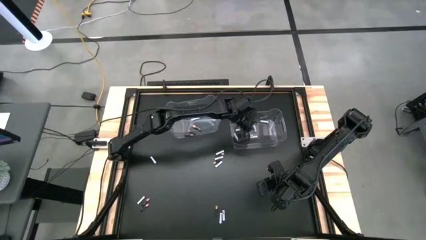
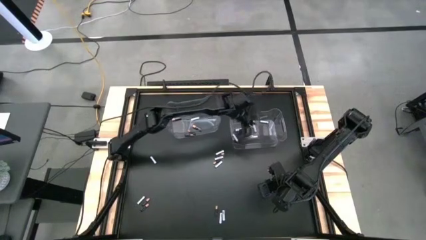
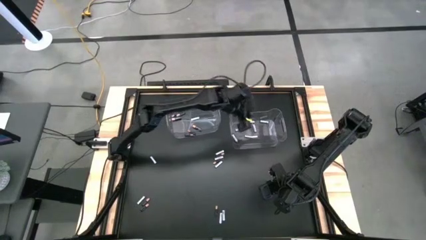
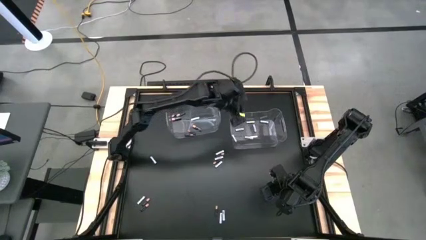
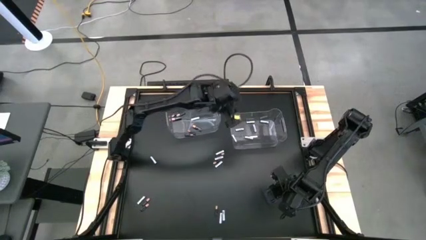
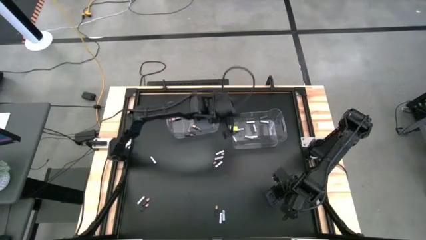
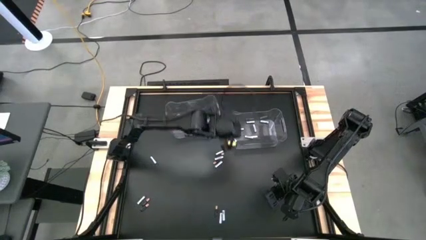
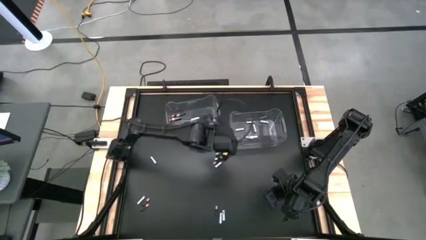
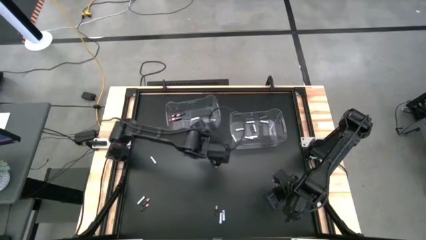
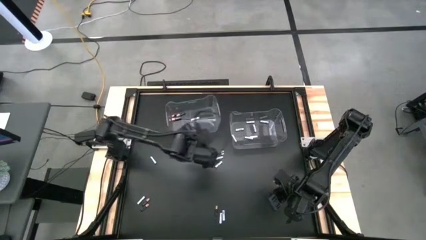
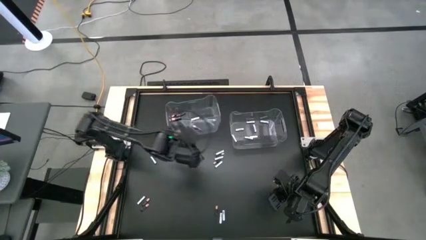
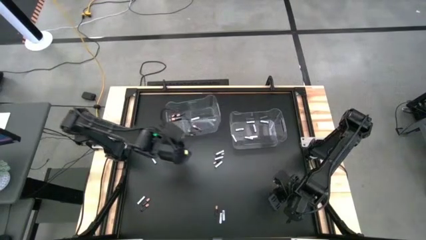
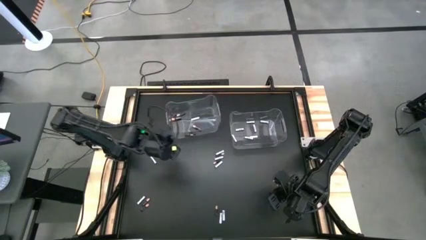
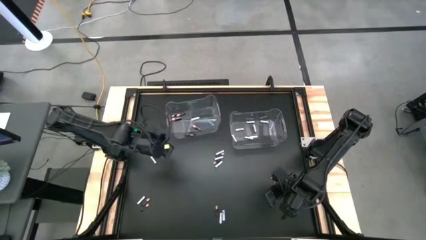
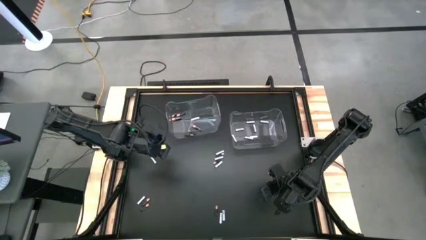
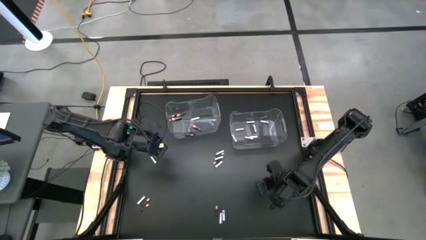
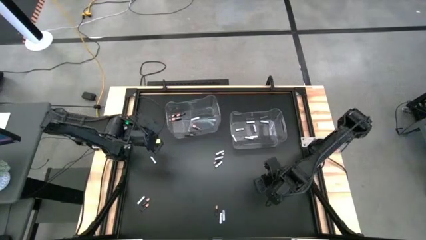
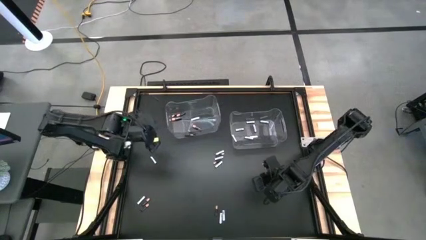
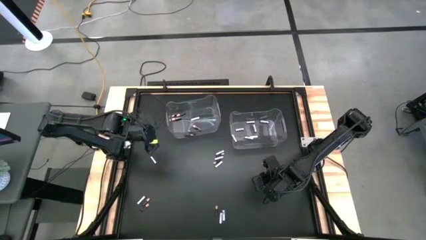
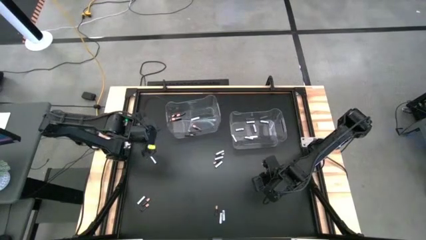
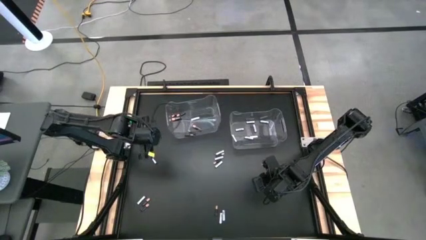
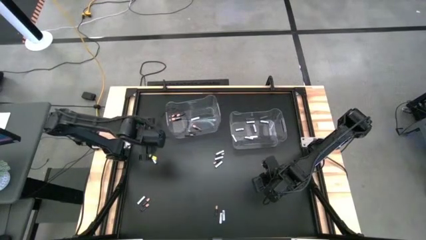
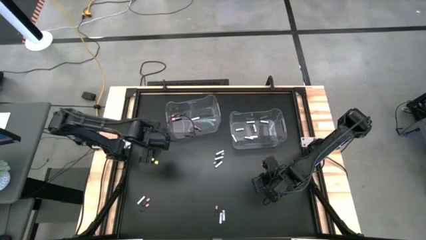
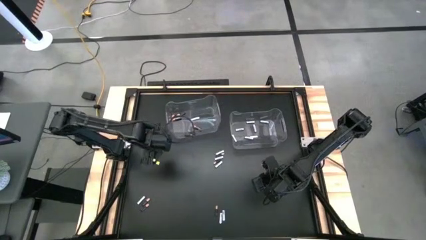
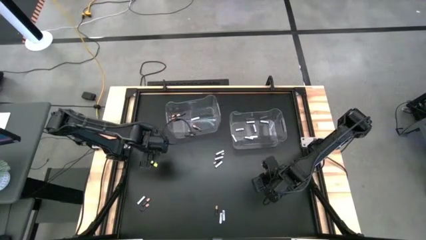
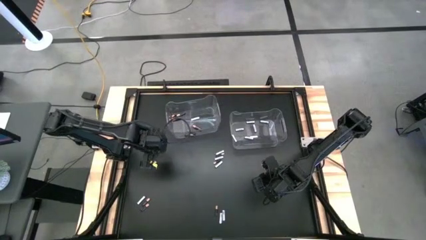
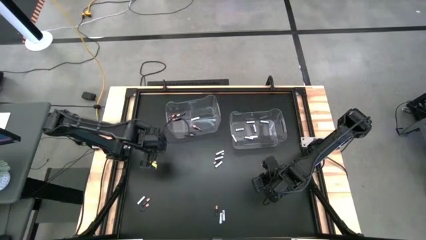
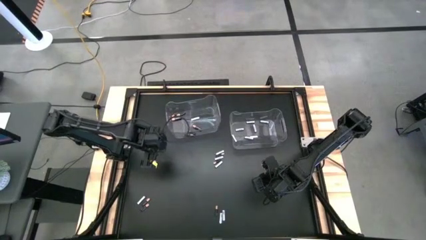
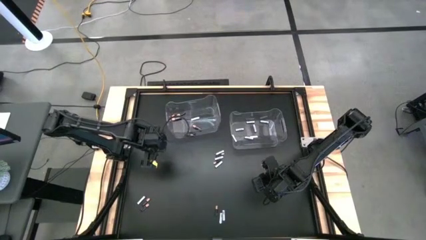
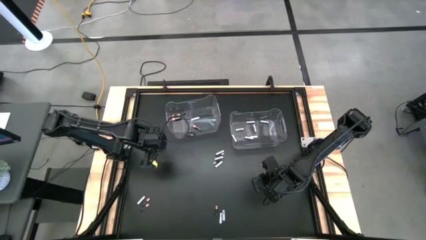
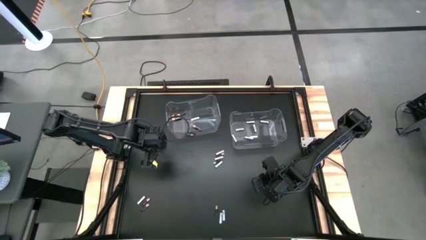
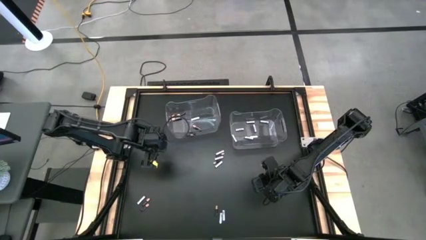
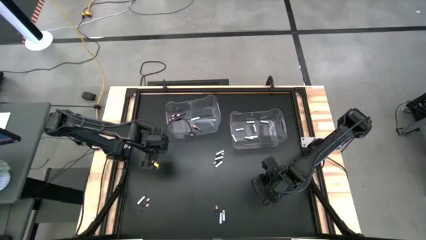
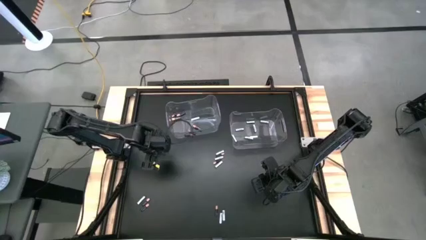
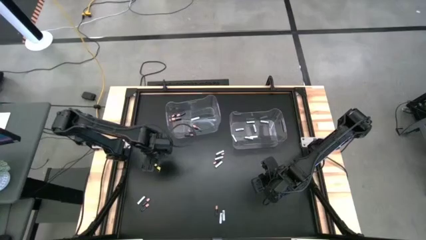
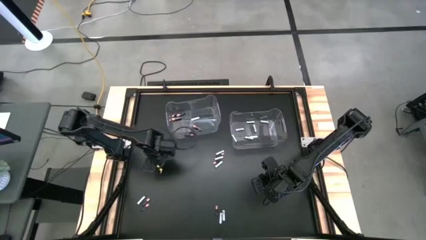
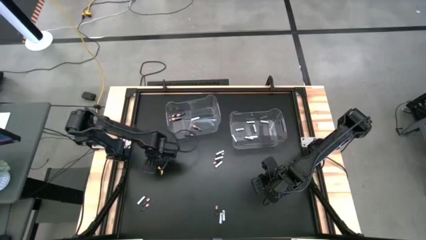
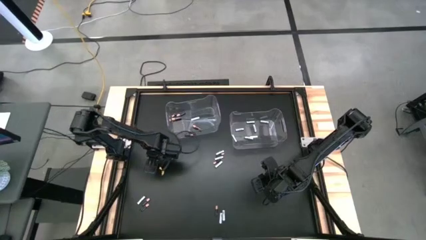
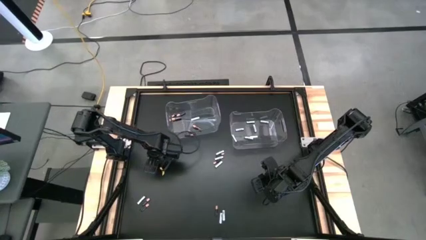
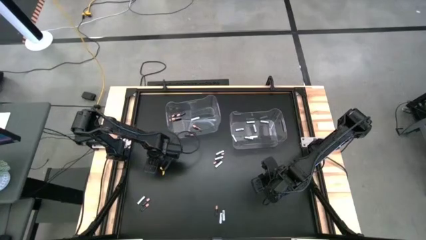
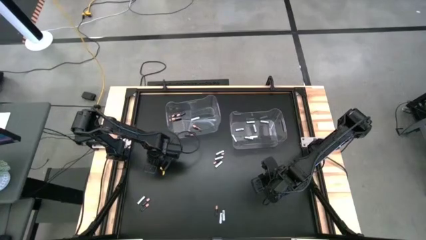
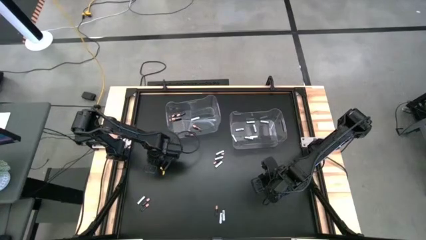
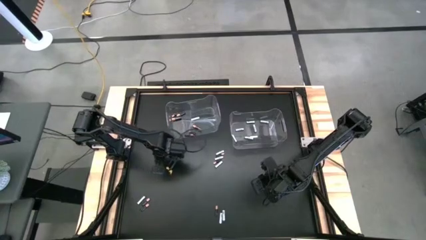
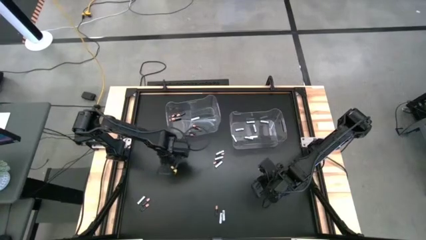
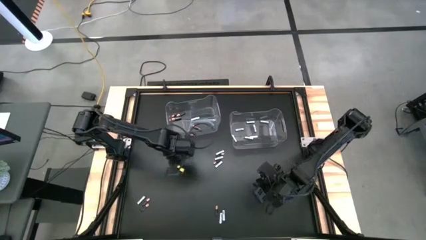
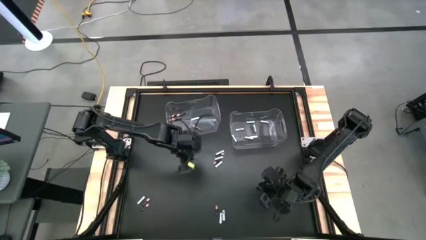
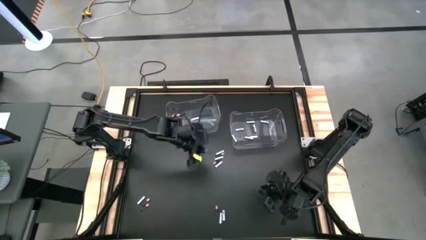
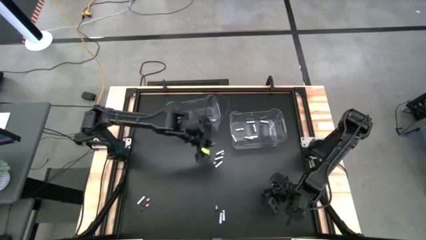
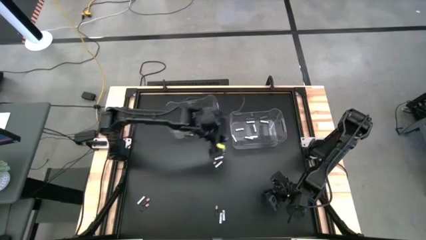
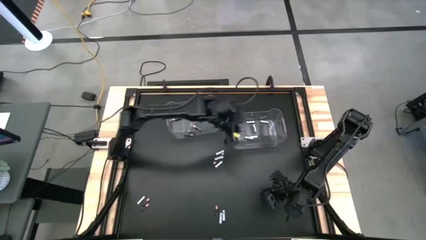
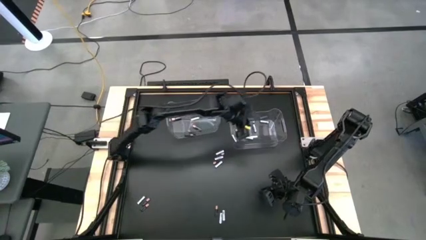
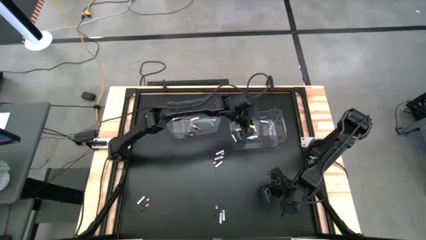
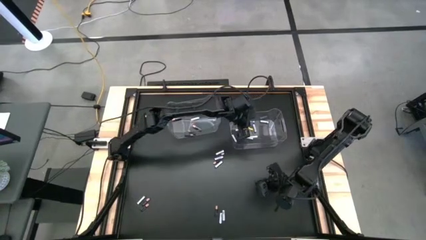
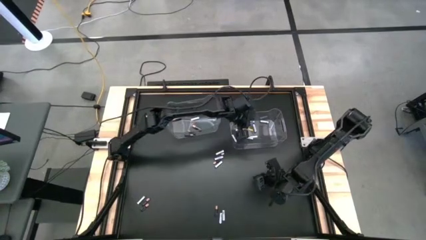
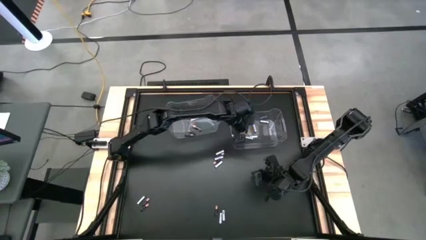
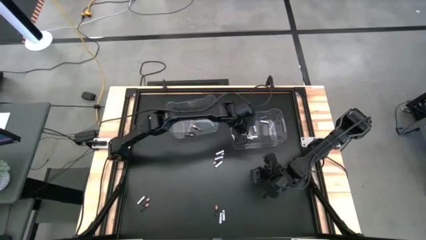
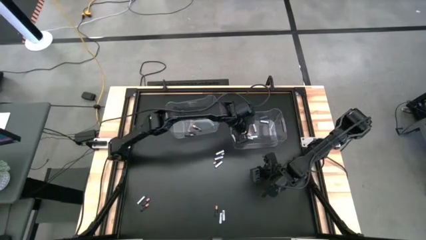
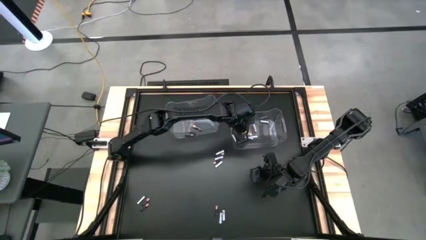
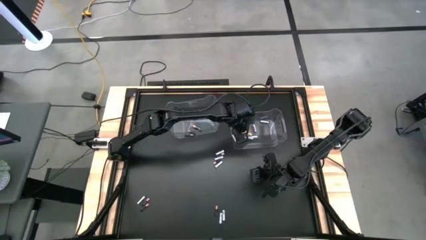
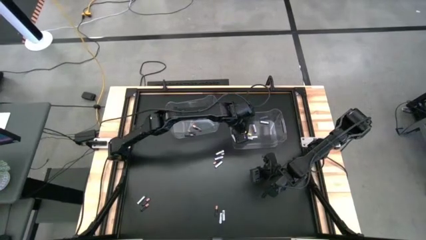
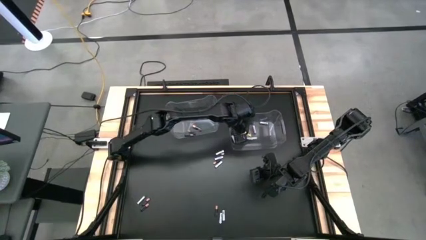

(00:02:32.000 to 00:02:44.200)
Task: Sort batteries
Put the white battery into the right transparent bin

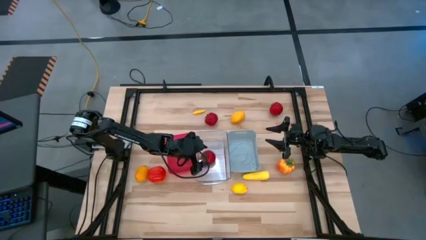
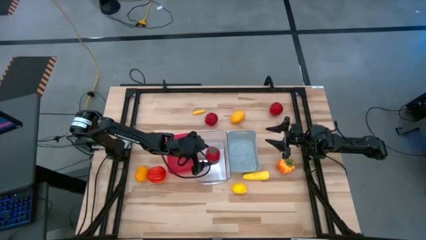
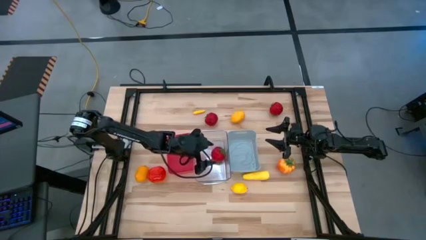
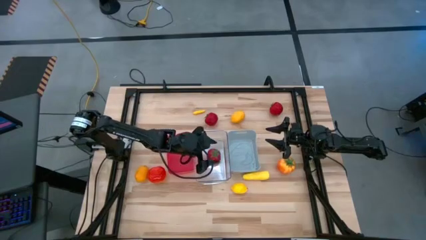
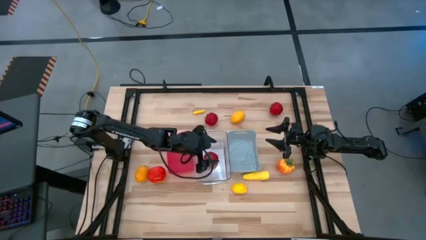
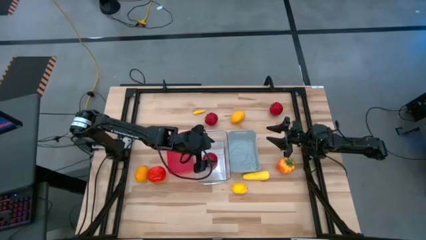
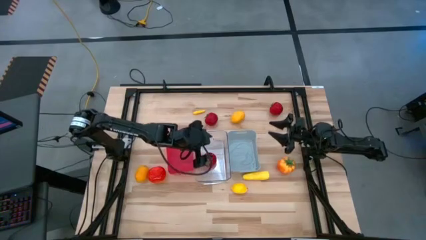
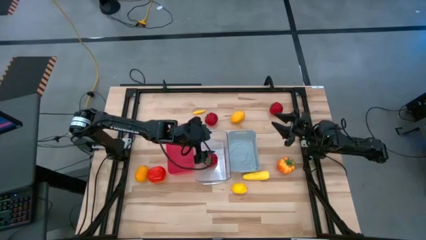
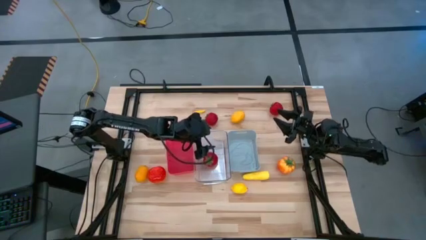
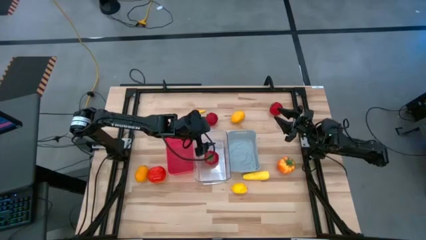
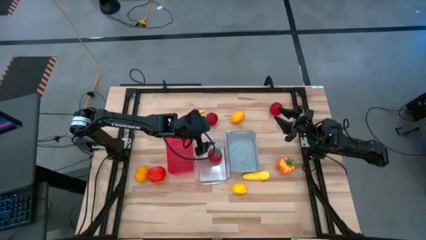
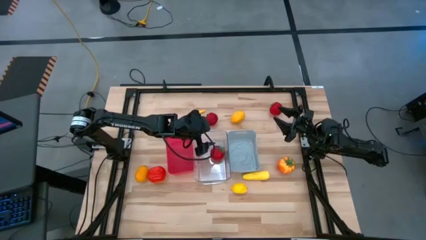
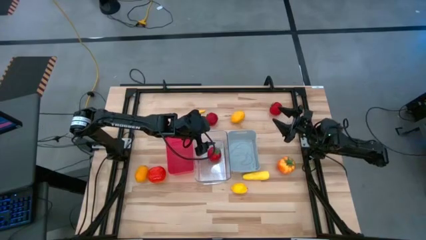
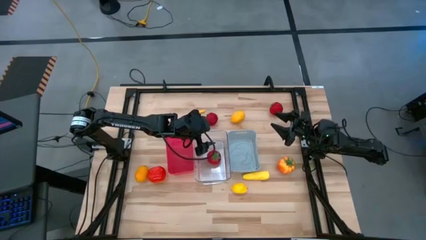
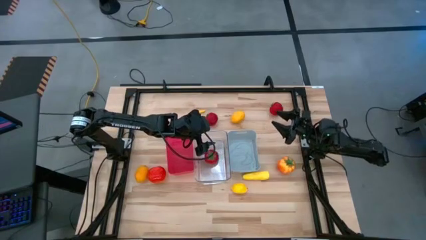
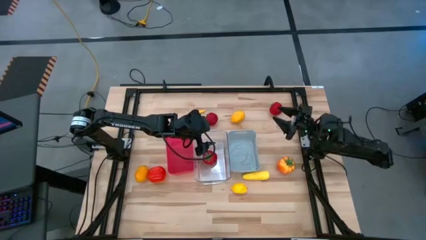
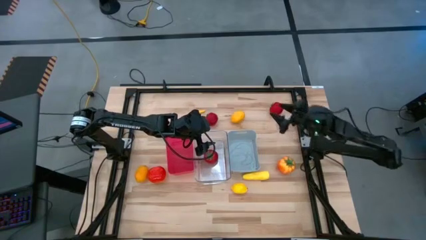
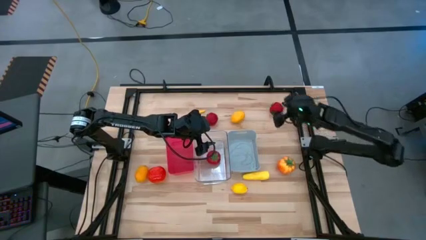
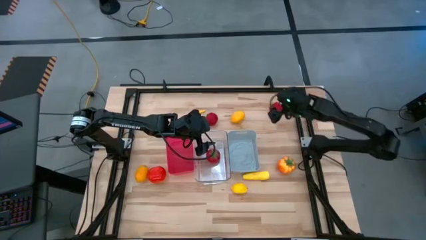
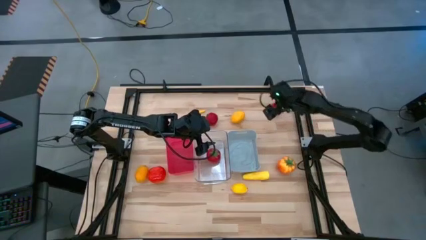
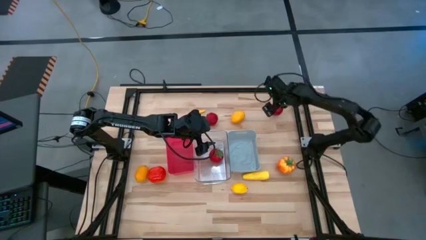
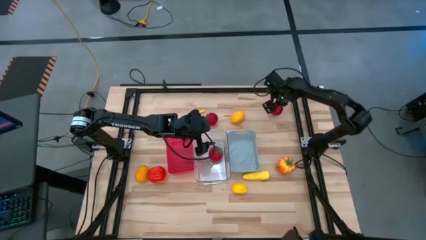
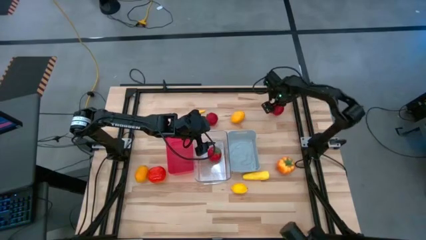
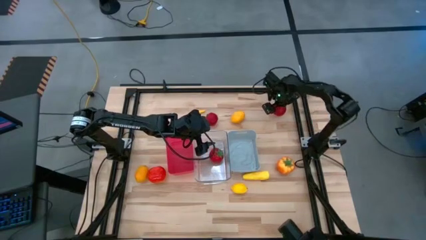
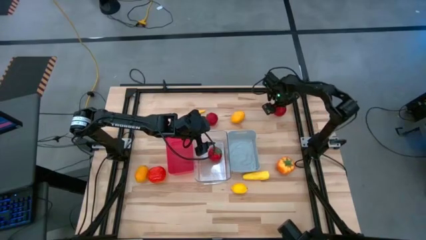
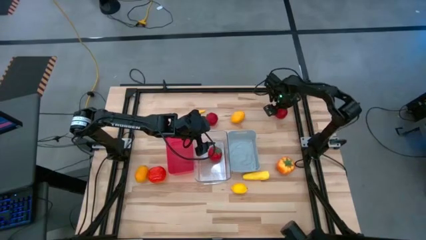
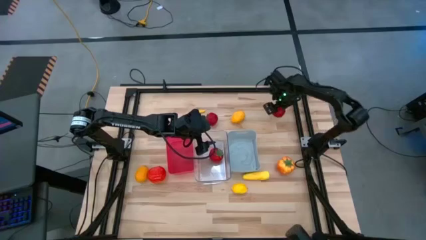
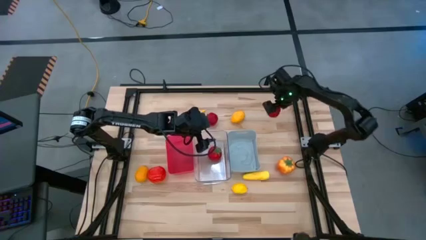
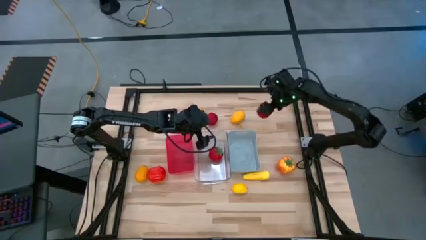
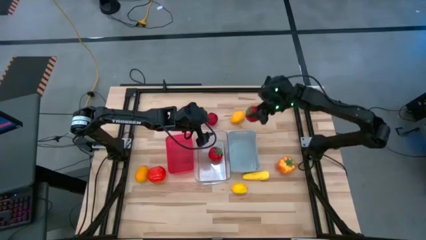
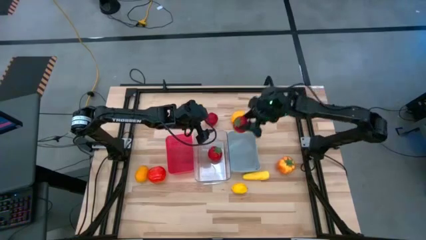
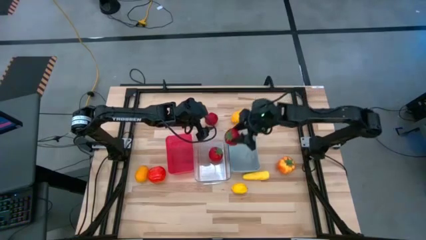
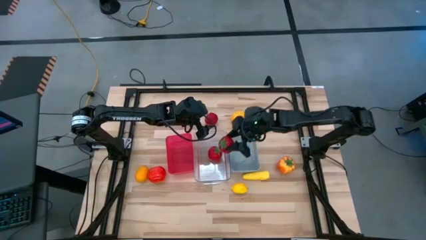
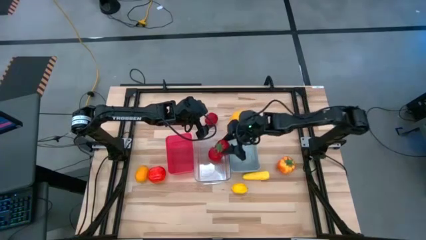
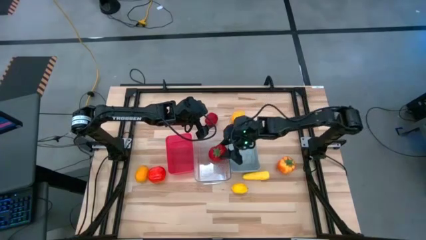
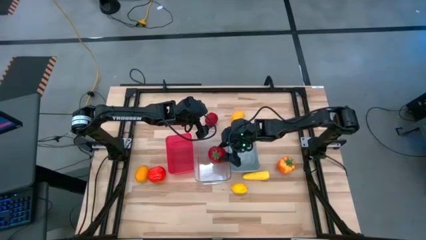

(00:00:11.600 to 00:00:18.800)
Task: Sort produce into baskets
Put the right red tomato into the transparent bin
